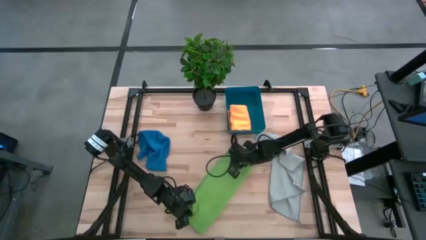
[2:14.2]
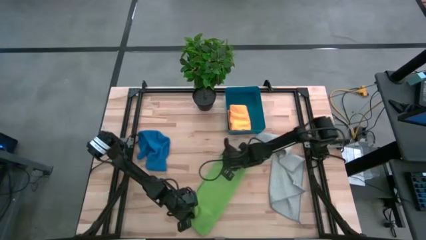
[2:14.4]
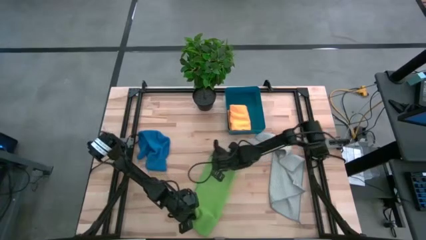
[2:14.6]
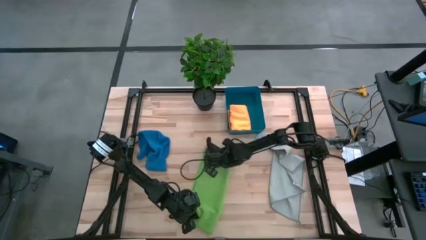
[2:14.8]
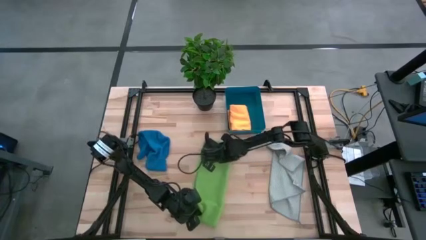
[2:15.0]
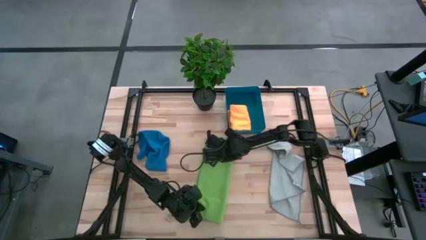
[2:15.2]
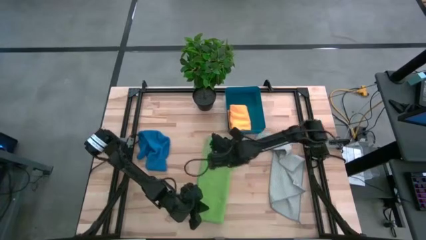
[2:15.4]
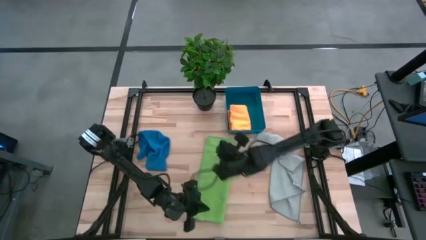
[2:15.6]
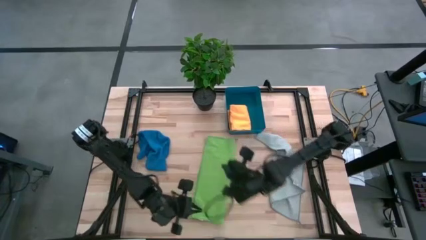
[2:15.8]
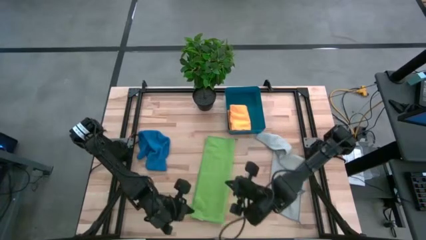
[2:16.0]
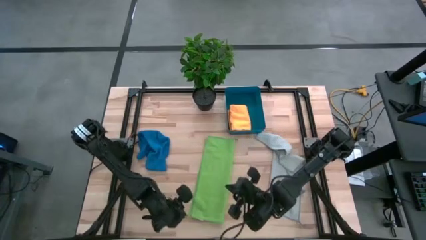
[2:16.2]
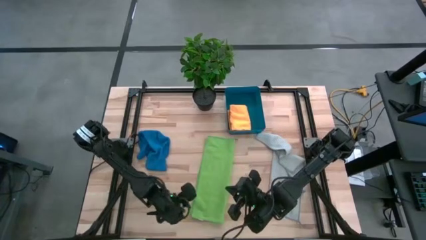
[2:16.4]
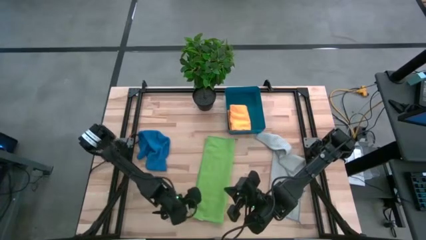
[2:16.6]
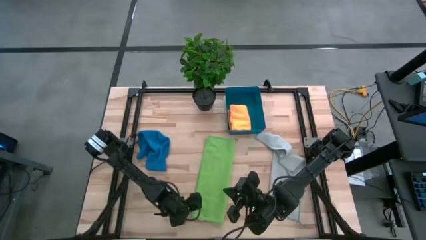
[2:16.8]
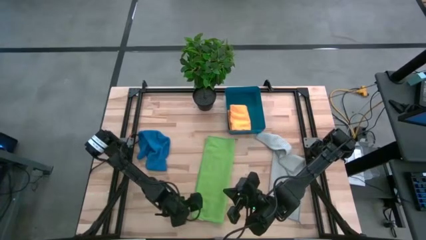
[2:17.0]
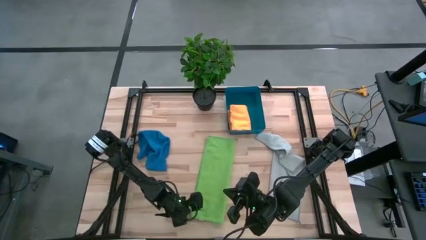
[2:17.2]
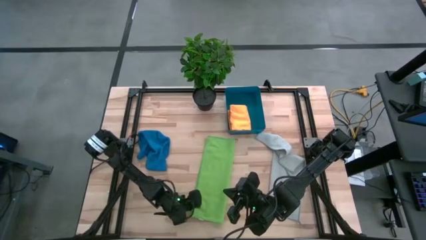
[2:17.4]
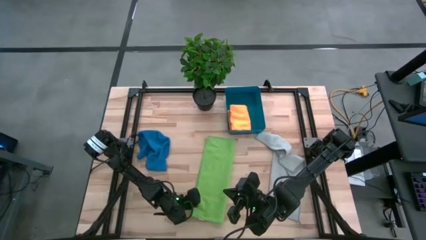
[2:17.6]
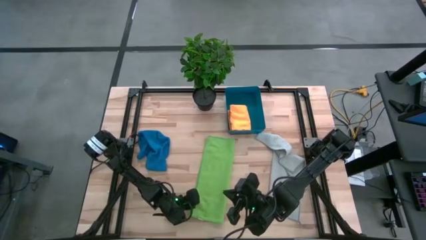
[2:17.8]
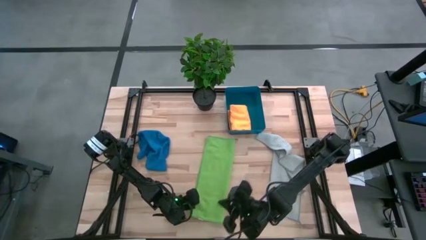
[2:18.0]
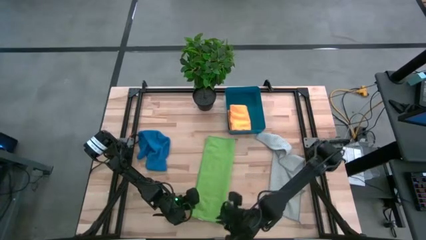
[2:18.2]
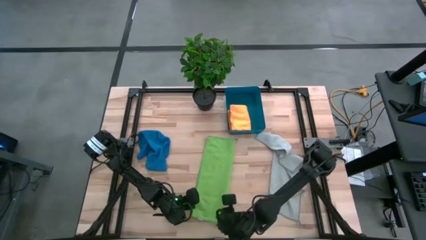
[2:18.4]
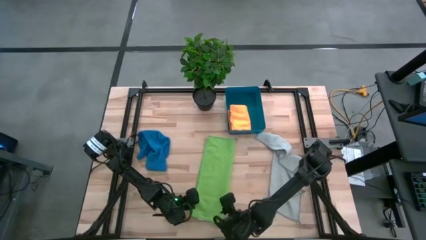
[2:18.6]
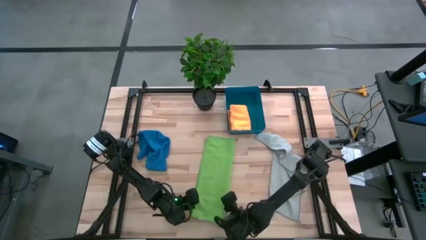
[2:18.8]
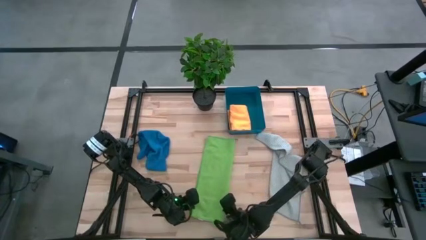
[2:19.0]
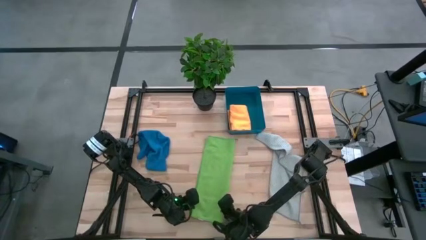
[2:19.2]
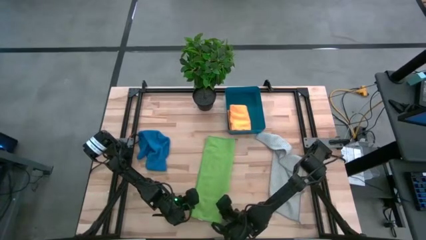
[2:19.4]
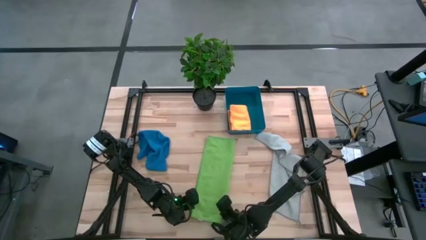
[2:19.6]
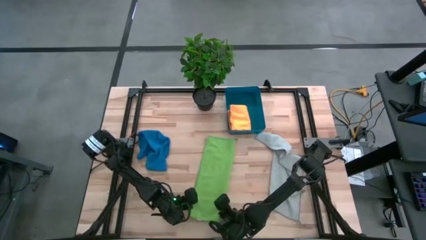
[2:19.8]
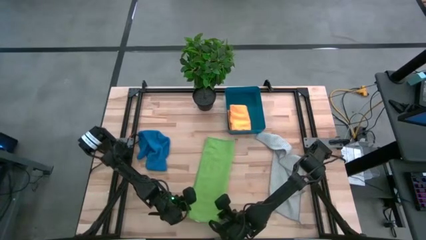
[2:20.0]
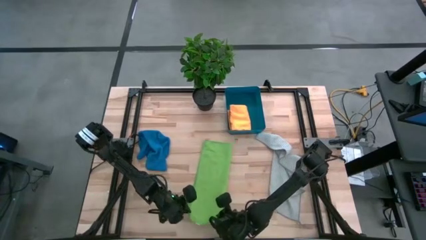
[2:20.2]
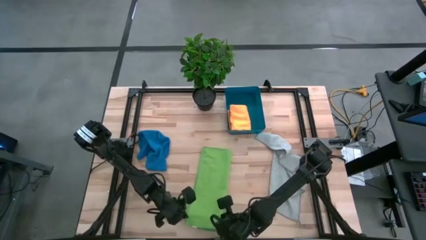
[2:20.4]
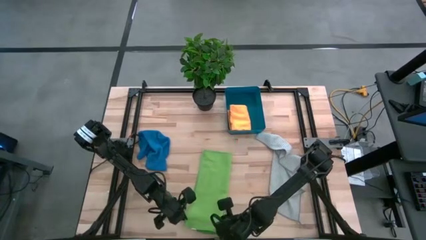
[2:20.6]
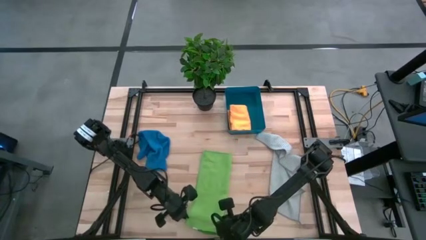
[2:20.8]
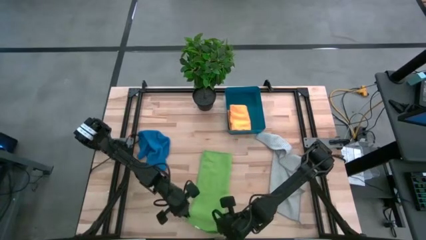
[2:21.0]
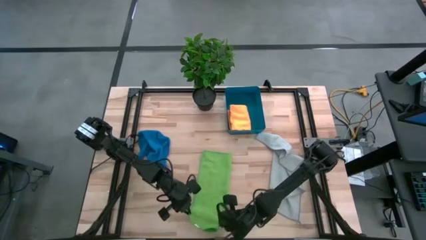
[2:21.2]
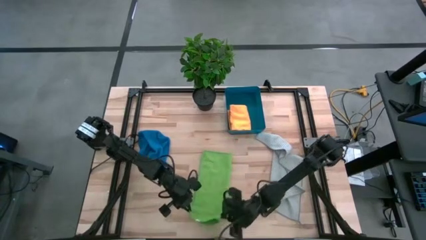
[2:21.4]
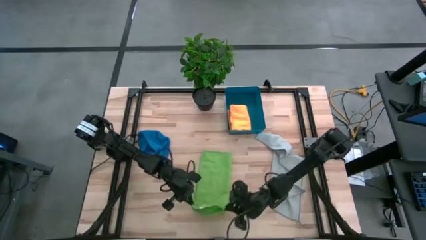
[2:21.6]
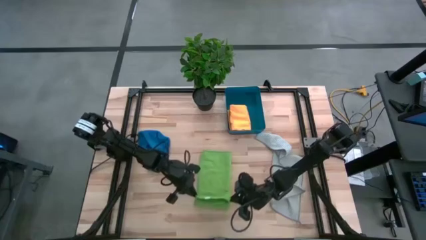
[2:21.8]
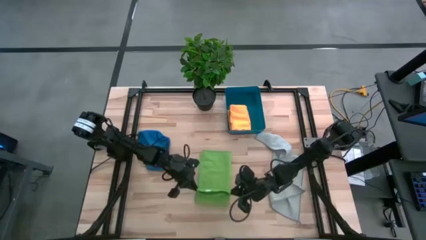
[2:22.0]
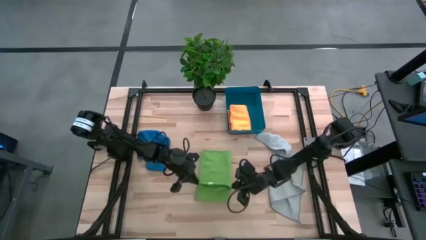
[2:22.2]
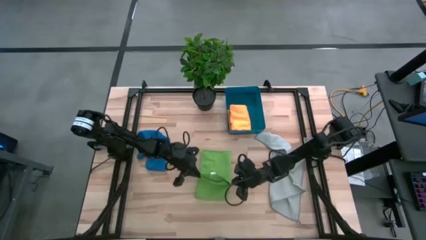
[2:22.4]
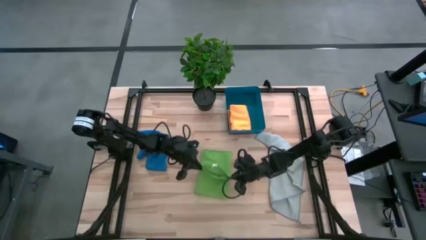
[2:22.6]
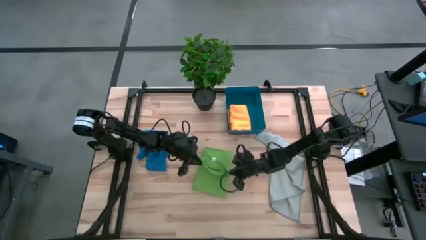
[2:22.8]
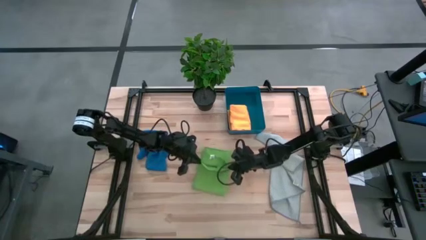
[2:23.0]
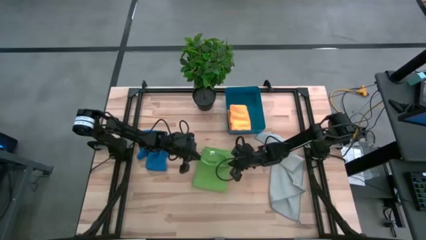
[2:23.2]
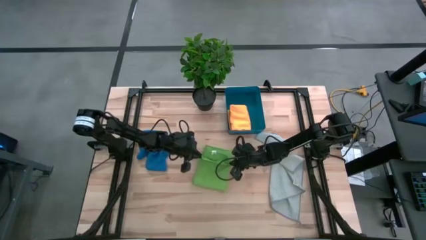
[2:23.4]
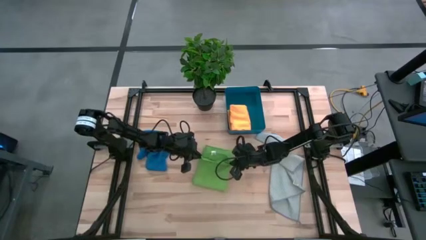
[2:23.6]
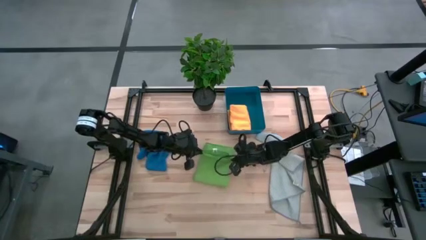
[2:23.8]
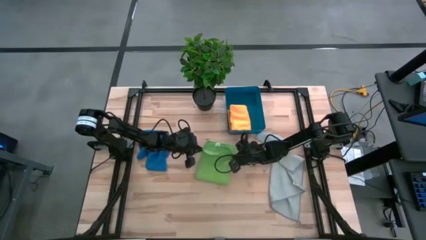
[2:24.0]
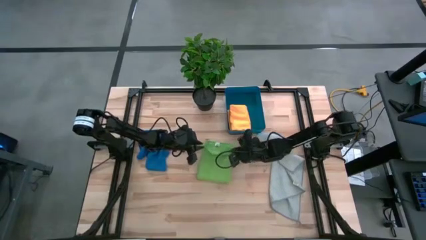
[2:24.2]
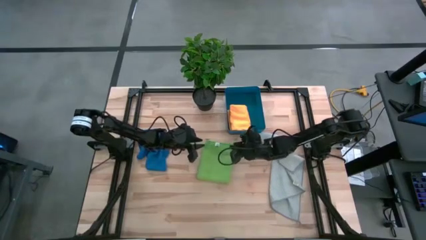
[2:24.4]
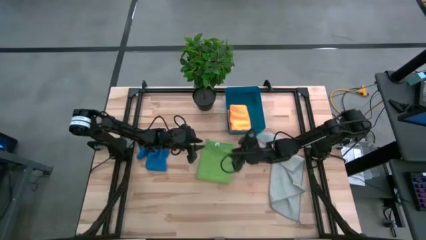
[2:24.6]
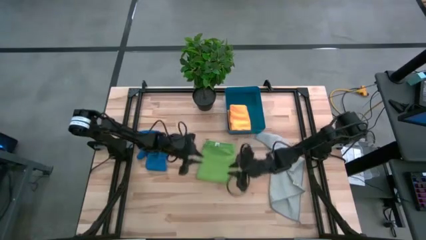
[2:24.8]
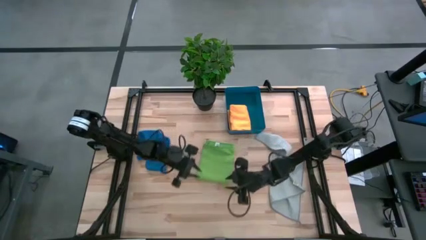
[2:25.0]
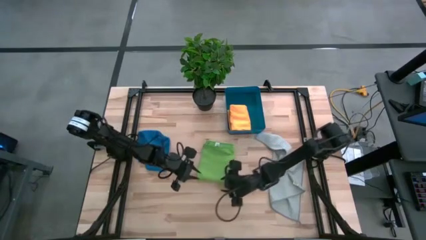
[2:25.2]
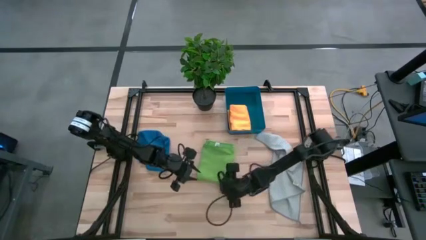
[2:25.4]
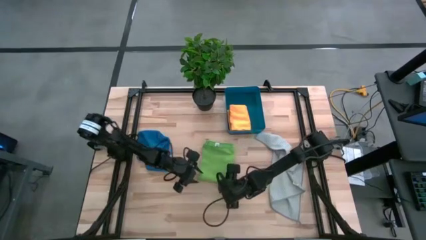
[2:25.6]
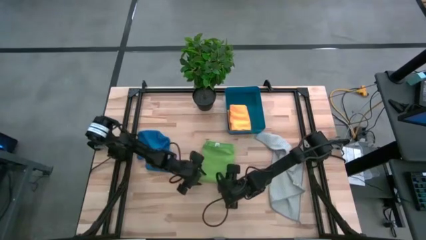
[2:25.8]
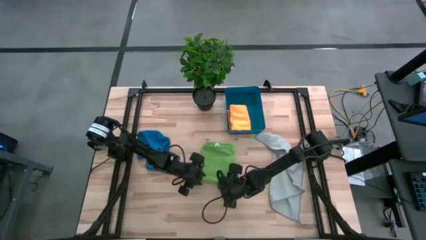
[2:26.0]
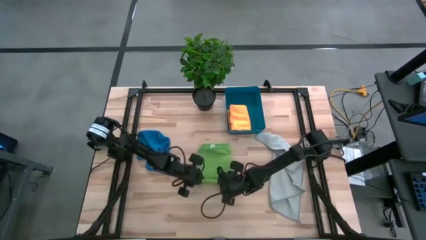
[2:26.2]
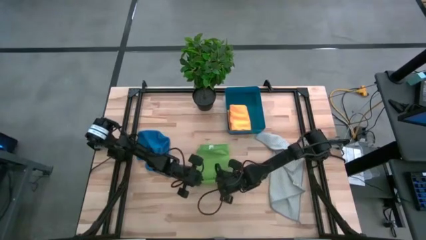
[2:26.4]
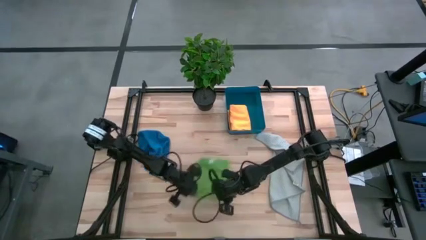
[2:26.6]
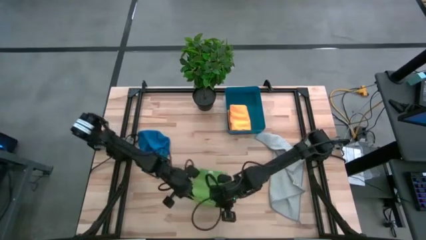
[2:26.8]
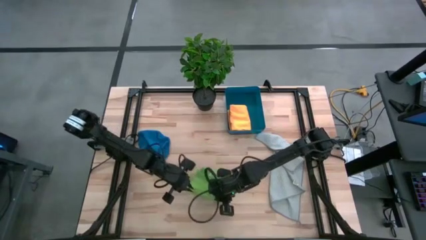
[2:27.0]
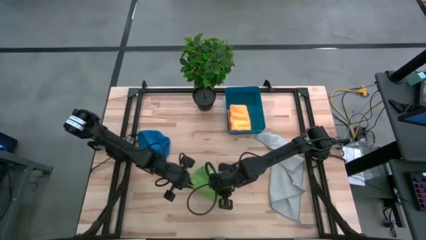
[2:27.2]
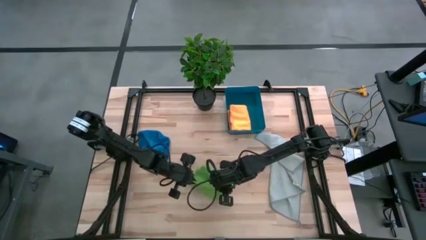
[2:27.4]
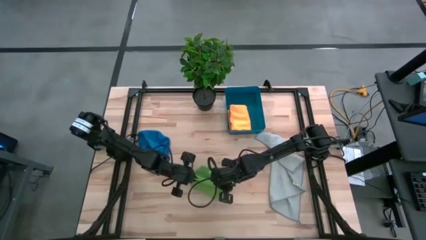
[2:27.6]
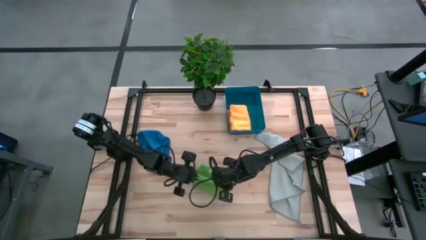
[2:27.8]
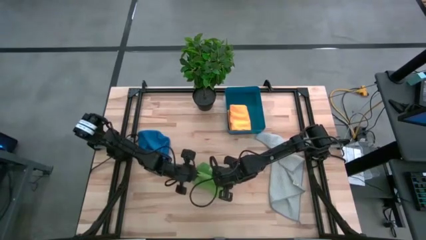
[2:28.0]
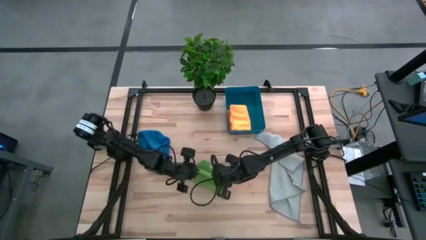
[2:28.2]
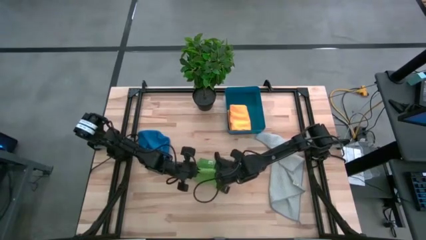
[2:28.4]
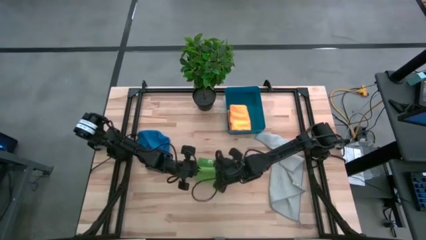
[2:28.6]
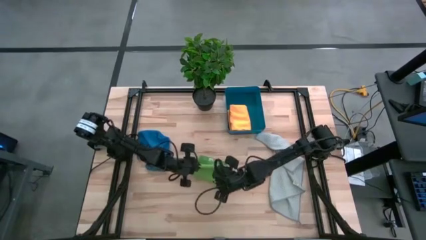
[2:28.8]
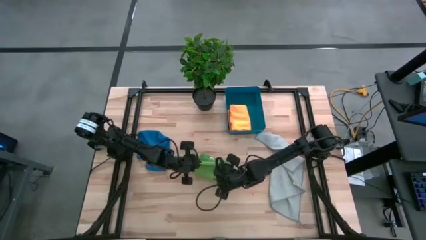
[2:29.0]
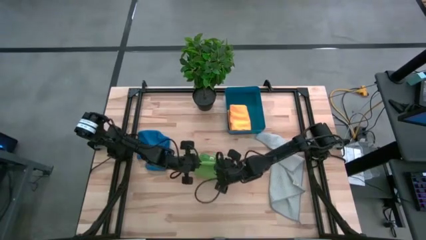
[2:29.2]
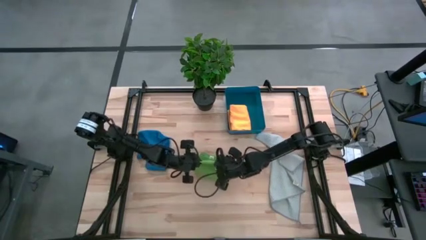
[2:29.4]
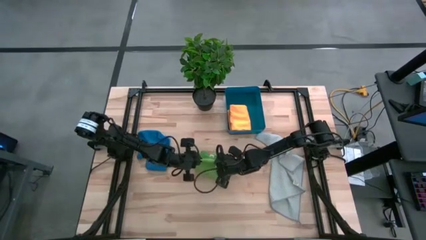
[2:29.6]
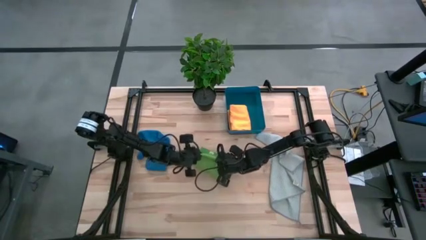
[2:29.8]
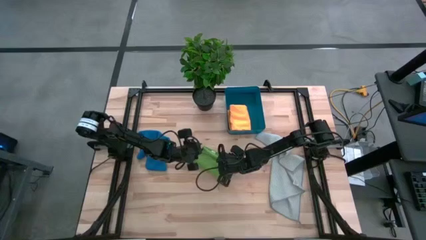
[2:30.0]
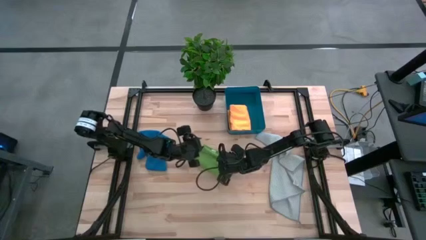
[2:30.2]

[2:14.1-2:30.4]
Task: Fold microfiber towels
Fold the green microfiber towel
